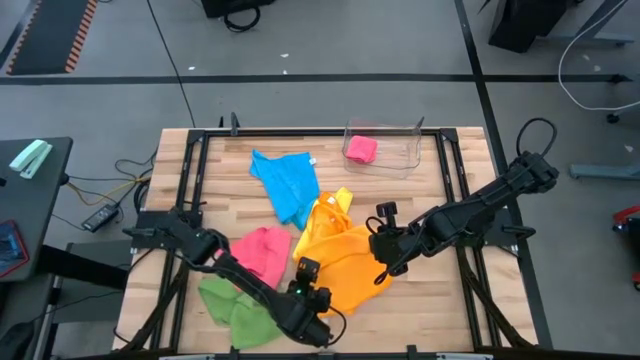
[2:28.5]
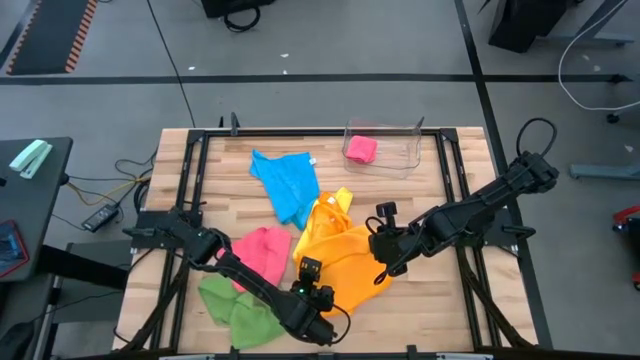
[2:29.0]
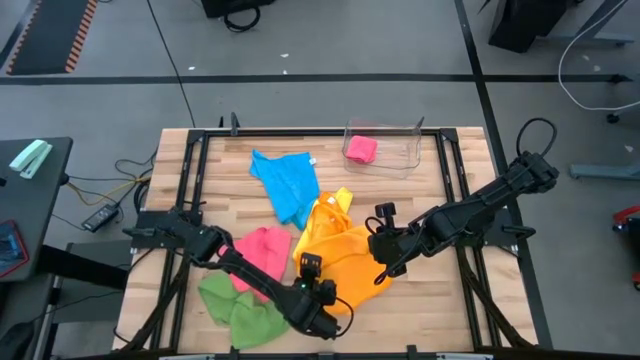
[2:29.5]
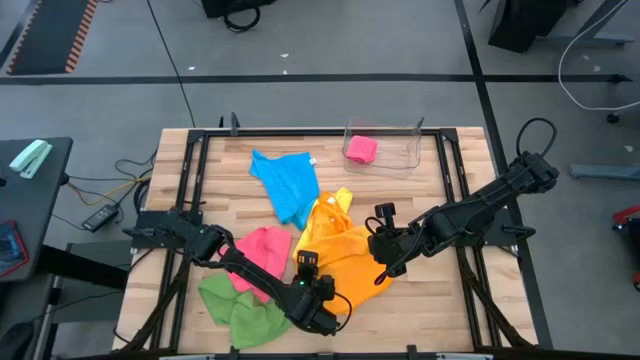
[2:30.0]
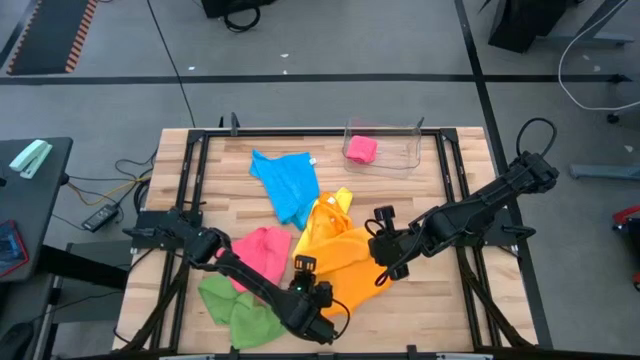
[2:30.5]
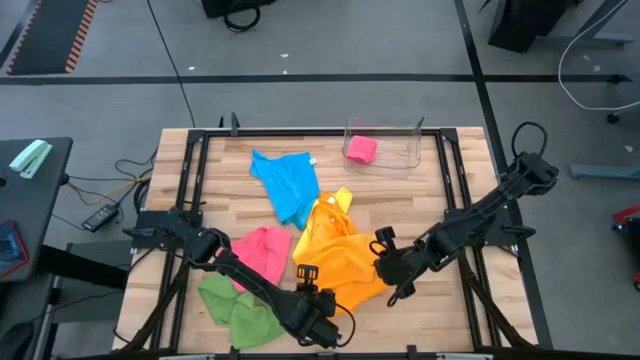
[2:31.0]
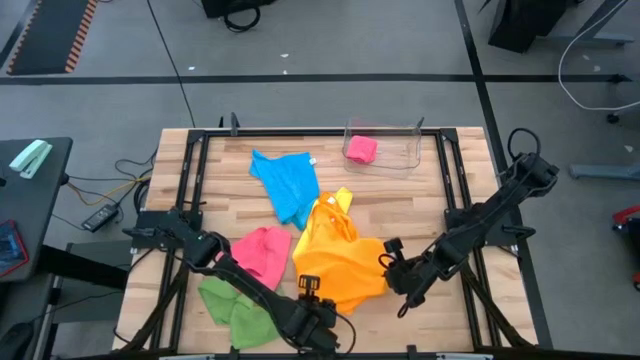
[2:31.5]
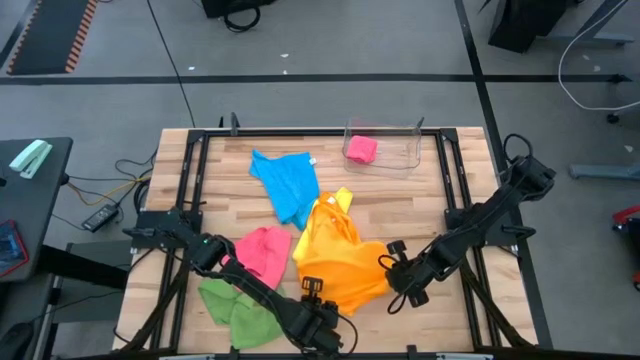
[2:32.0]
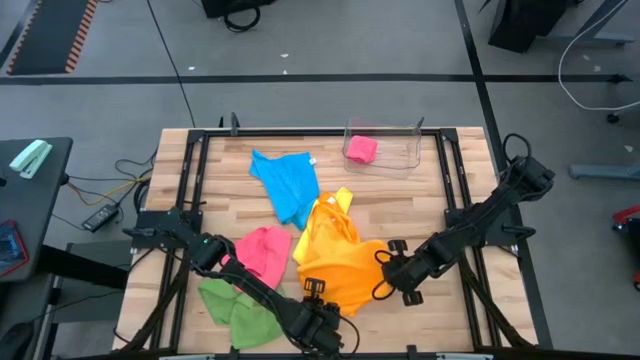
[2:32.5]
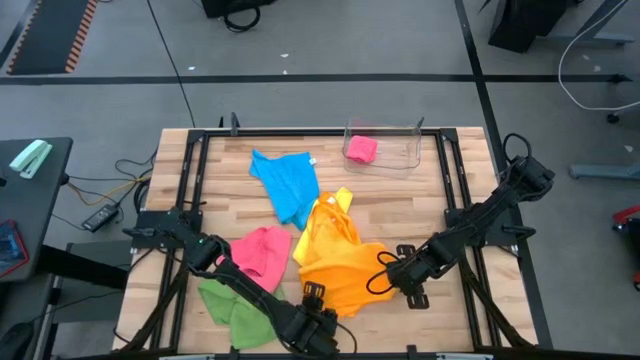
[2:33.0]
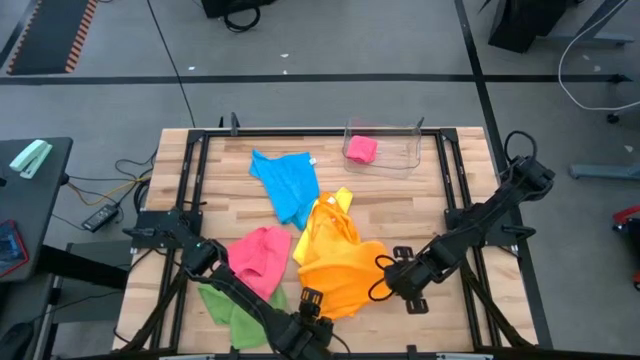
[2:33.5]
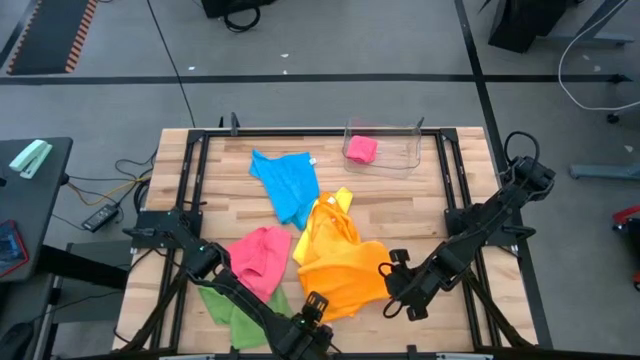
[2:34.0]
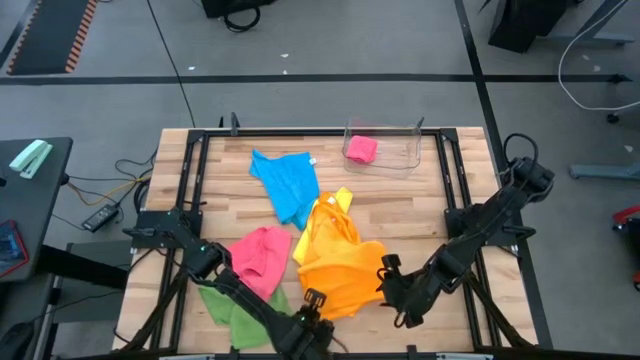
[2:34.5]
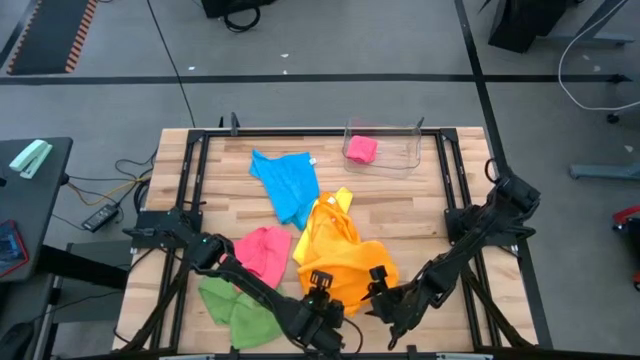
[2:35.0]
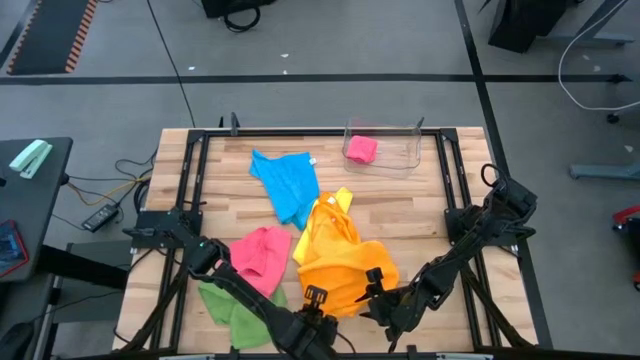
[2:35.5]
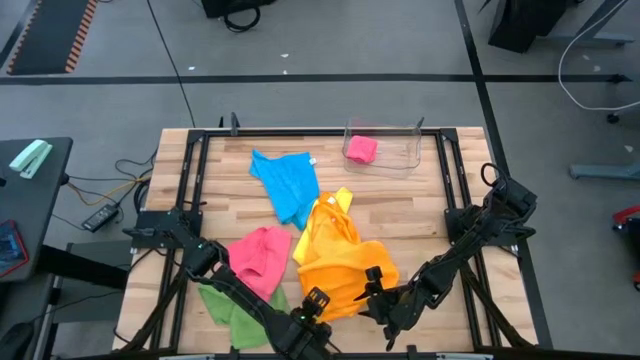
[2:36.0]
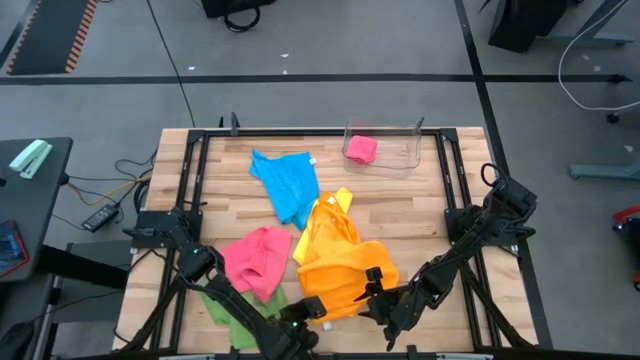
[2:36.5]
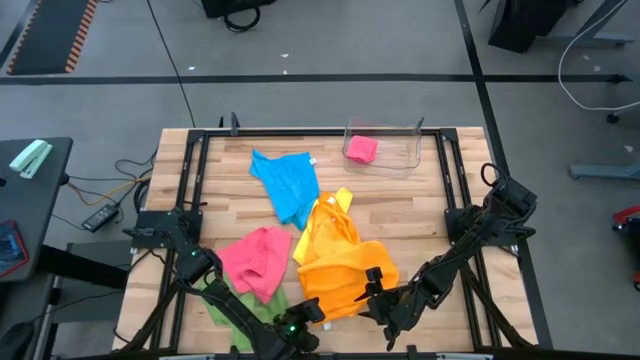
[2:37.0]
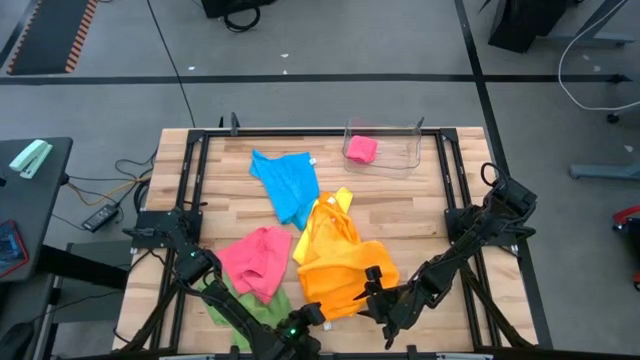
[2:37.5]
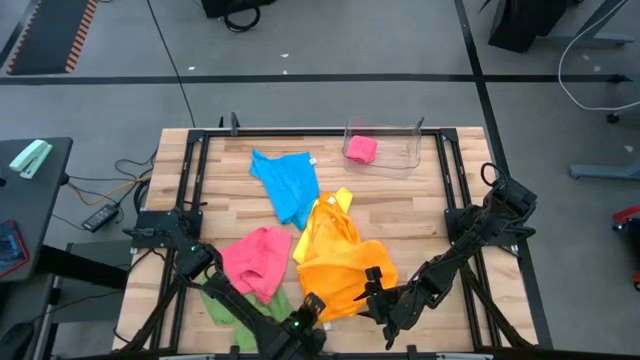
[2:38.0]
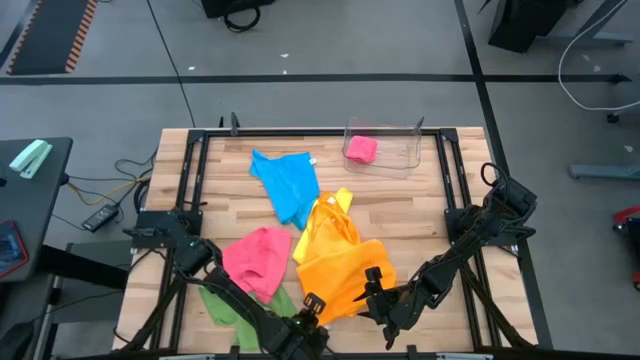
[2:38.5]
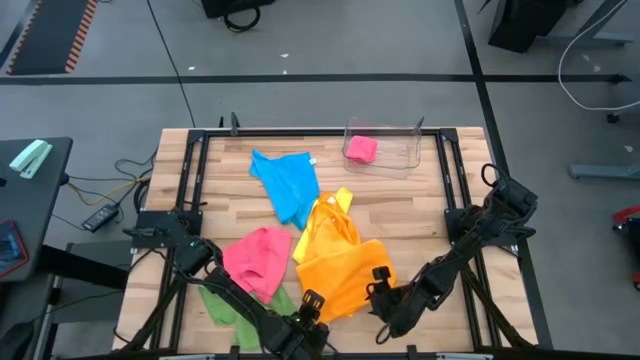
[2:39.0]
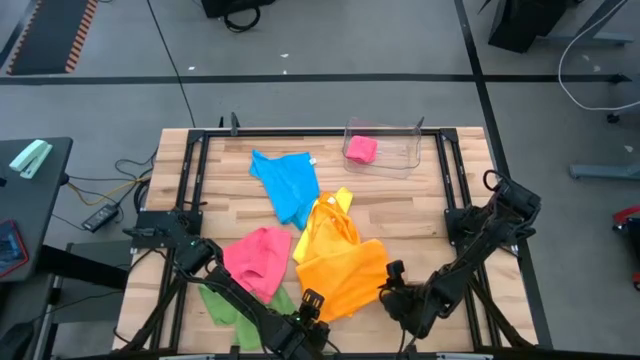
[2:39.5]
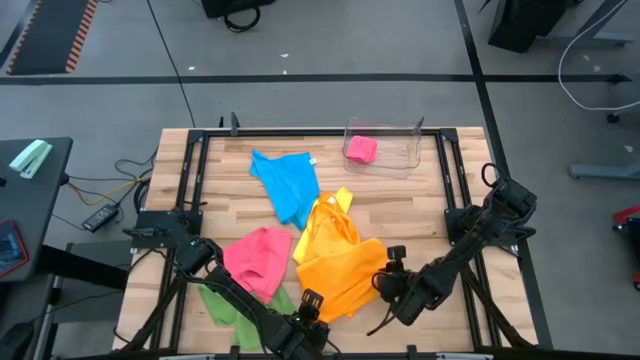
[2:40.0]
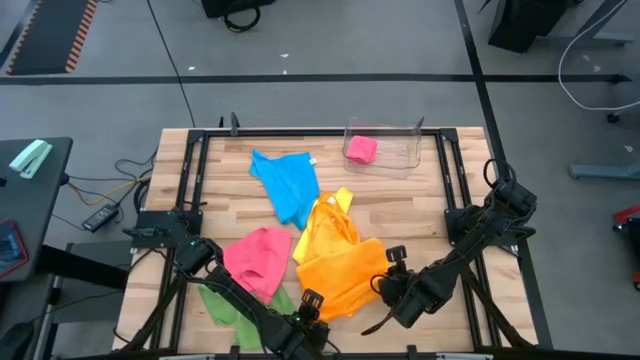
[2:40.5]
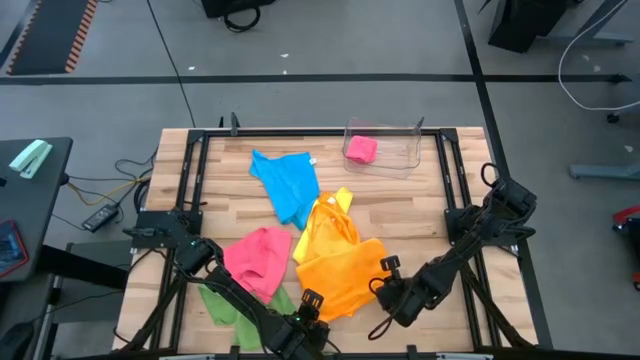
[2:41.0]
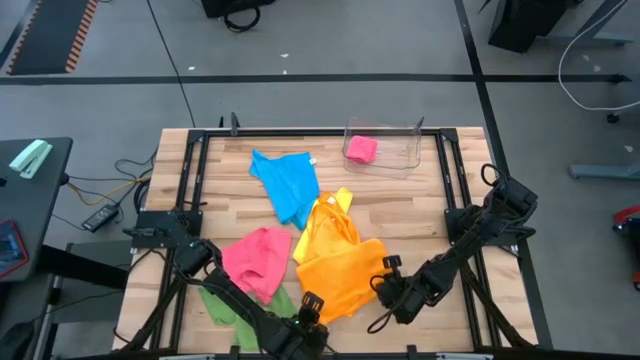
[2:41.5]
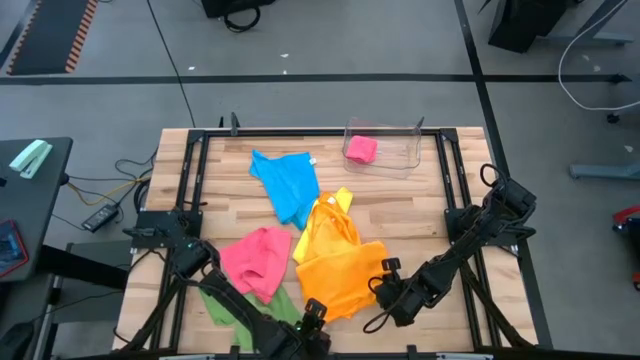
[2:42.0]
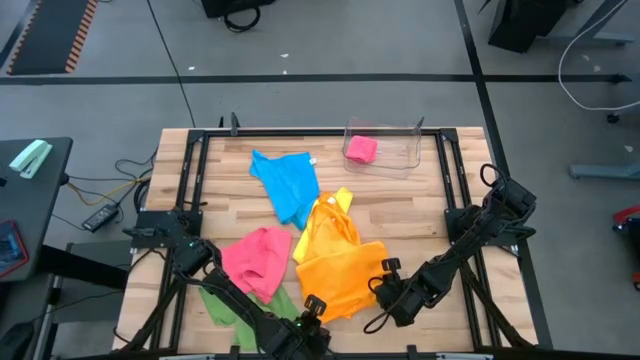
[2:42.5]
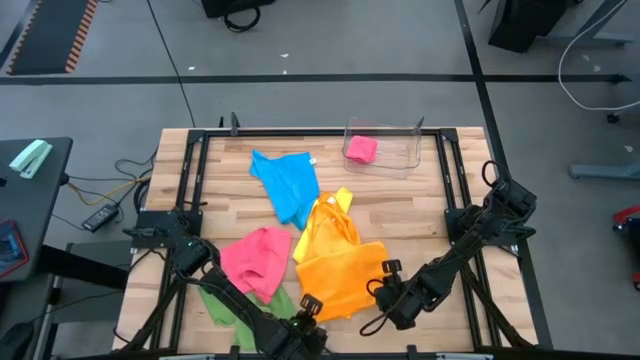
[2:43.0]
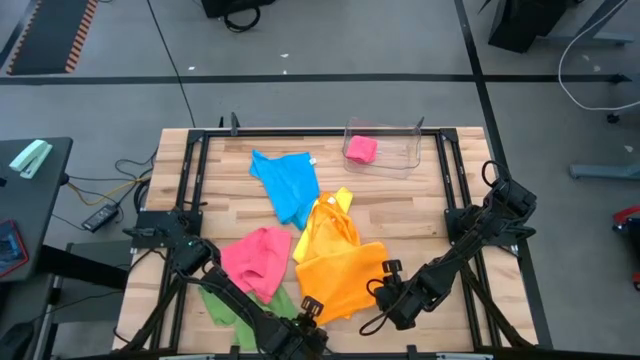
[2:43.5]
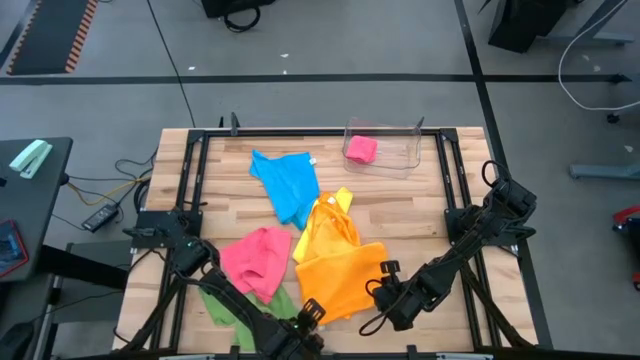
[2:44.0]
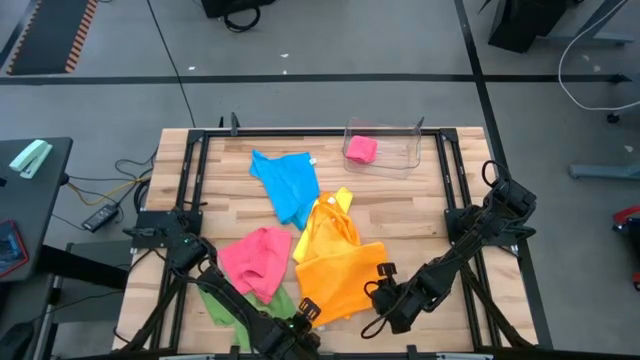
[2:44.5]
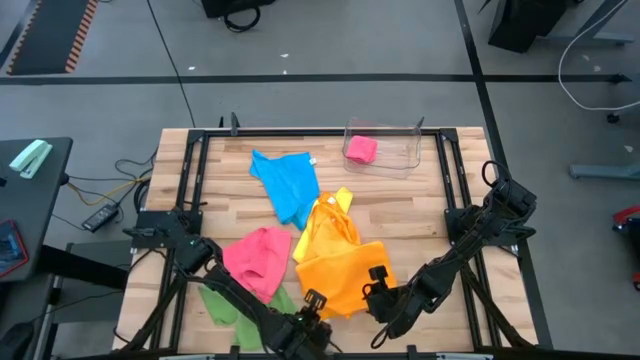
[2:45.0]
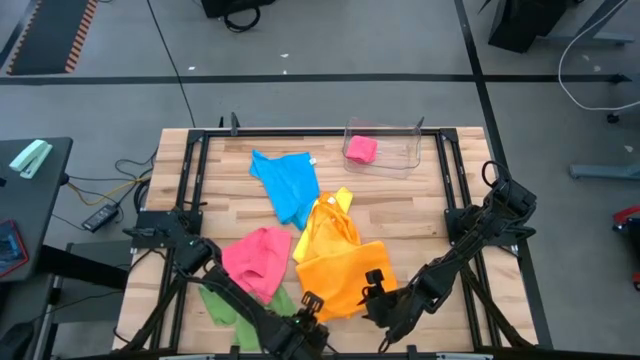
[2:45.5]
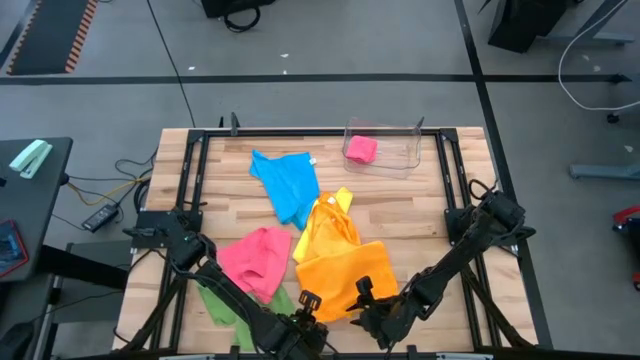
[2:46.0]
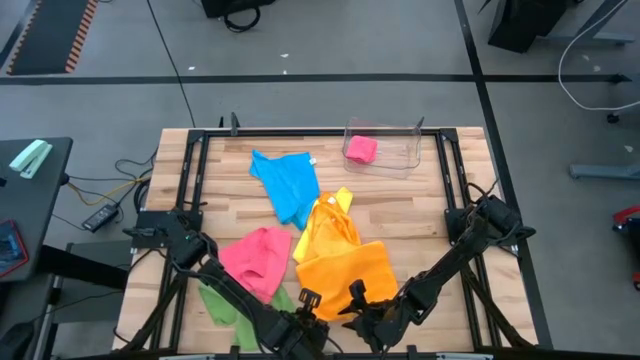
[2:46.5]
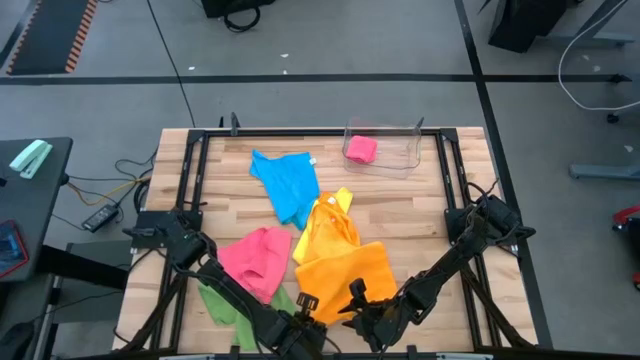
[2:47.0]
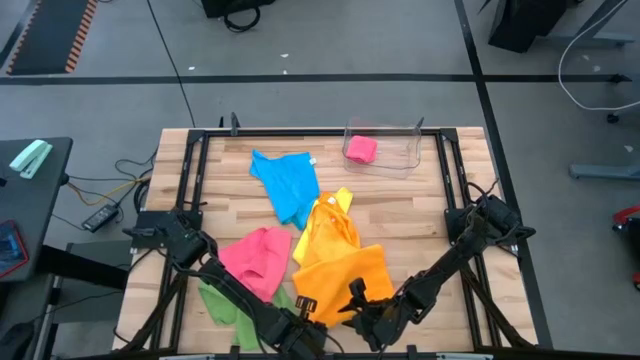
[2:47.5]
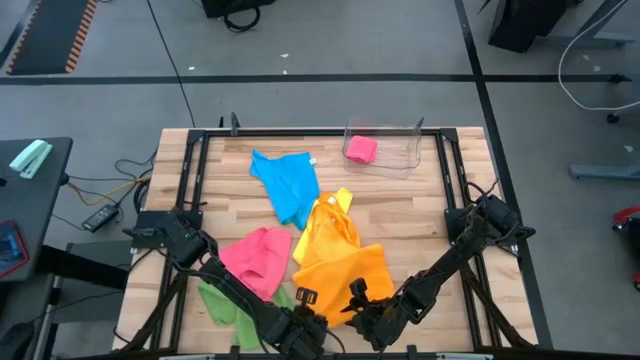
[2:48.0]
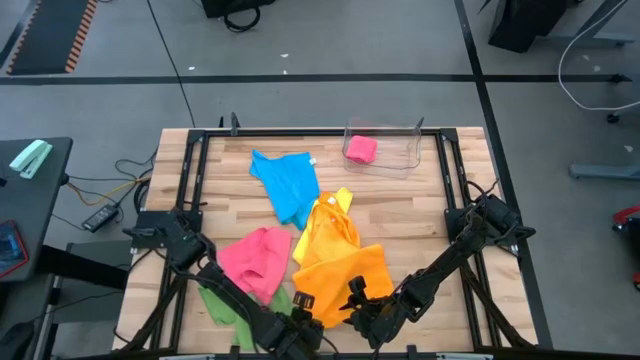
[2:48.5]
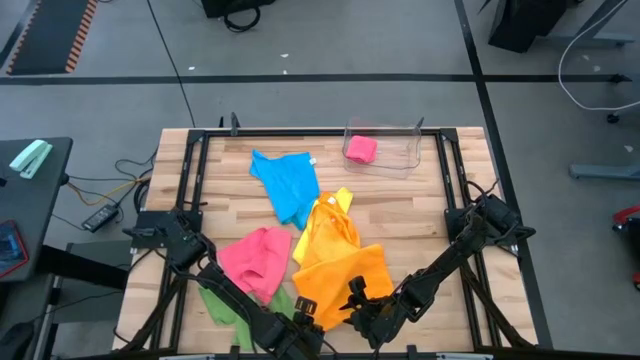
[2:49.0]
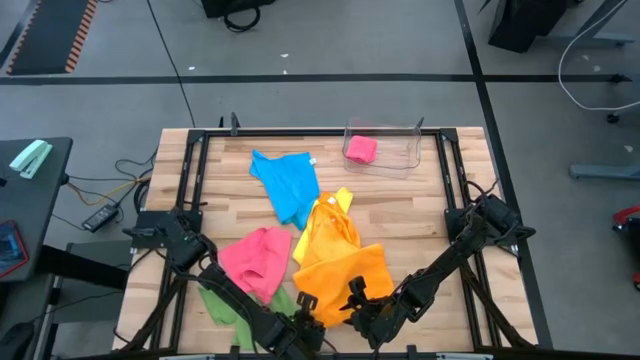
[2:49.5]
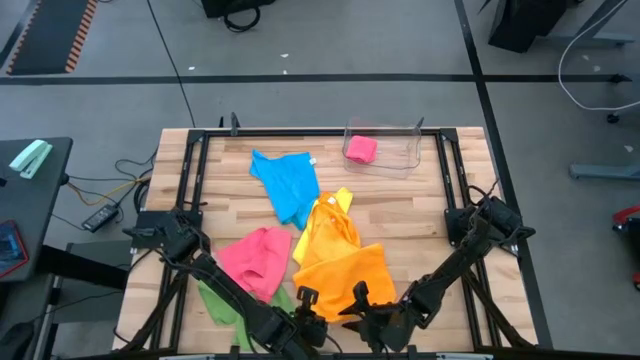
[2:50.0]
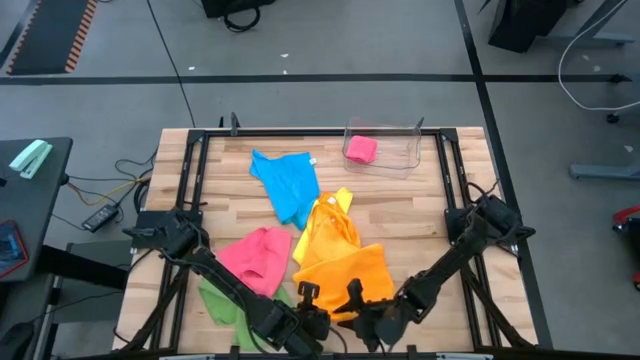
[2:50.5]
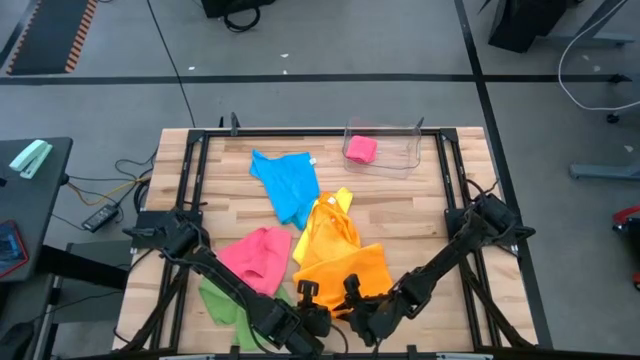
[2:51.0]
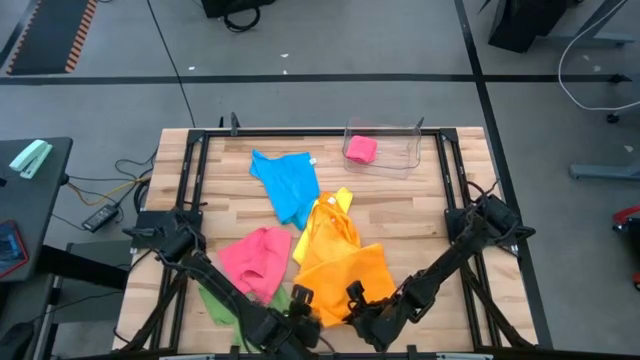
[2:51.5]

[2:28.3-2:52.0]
Task: Fold microfiber towels
Fold the right orange microfiber cloth
